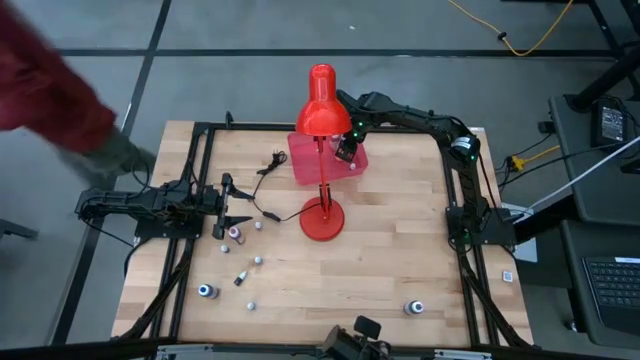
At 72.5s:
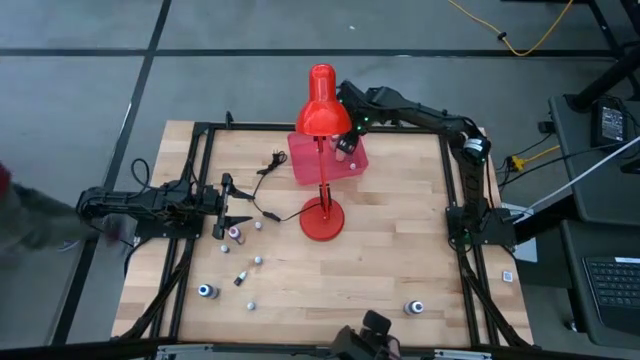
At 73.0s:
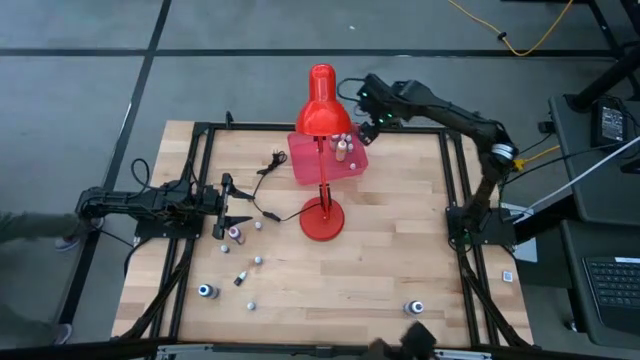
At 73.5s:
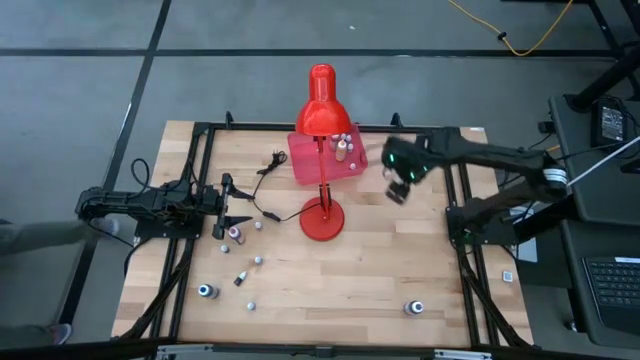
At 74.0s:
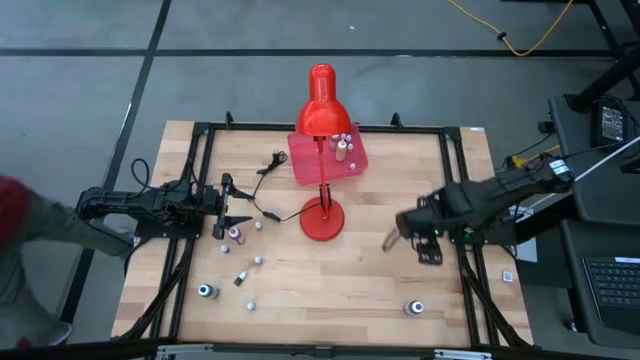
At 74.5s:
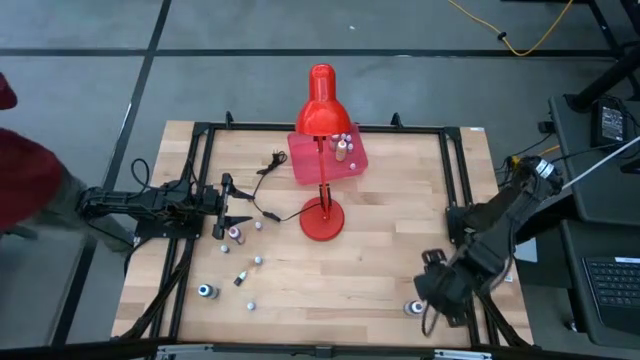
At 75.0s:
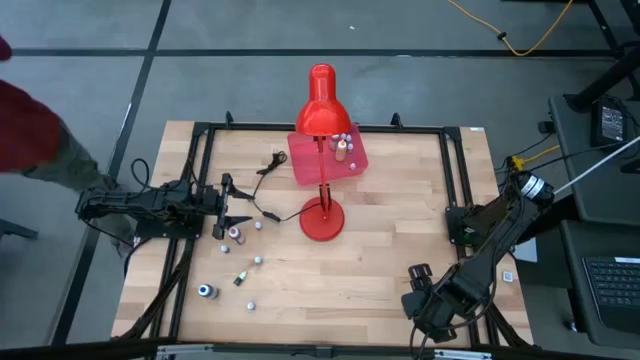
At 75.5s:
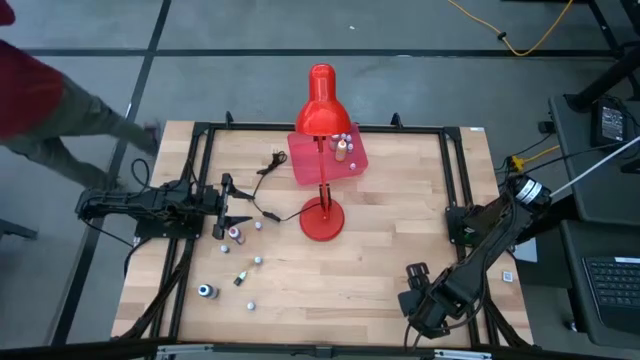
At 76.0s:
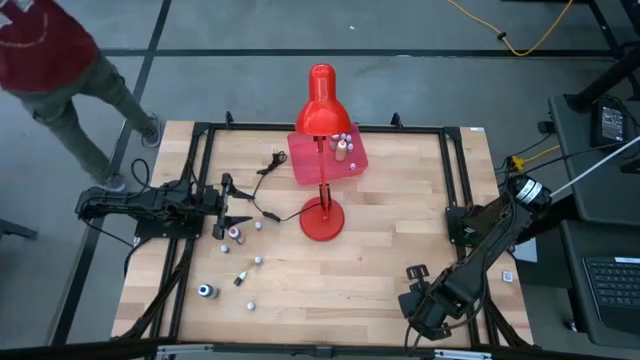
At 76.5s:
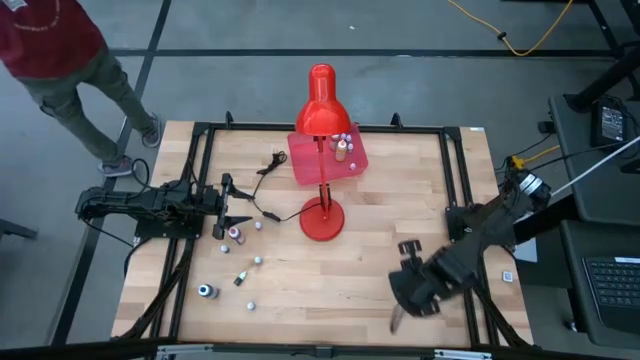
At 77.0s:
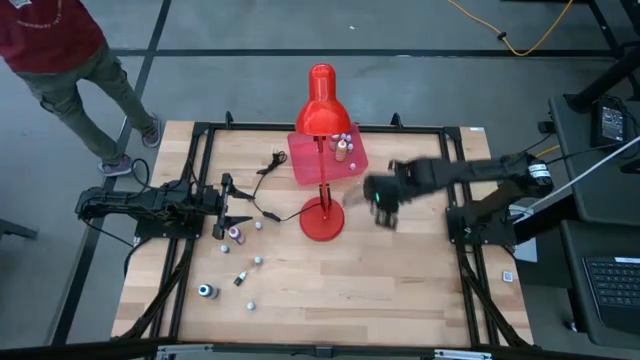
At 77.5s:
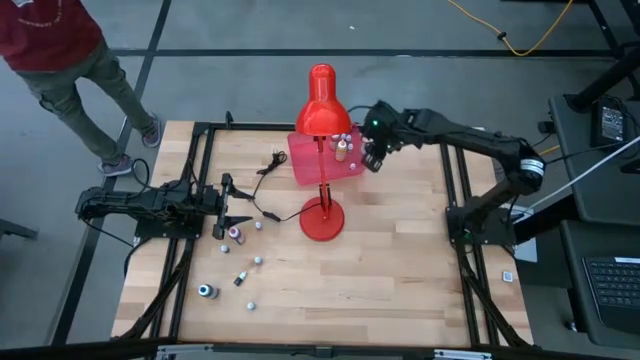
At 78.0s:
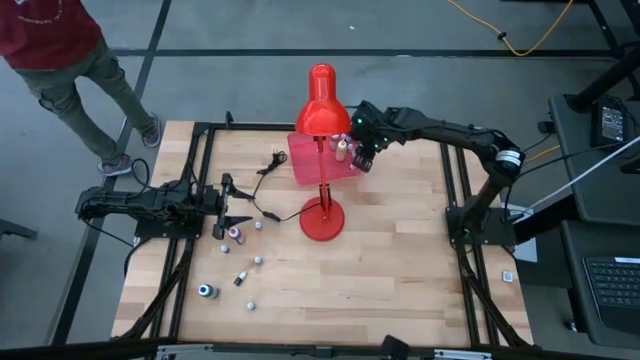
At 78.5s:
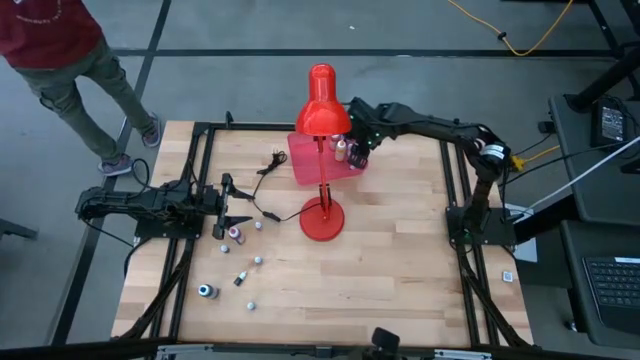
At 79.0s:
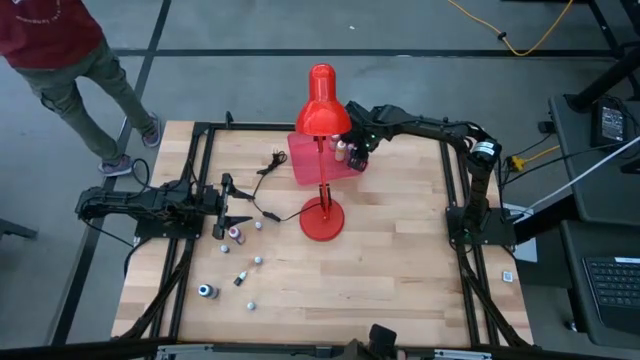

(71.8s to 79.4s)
Task: Pick & Place food coloring
Put the large purple food coloring bottle into the red bin

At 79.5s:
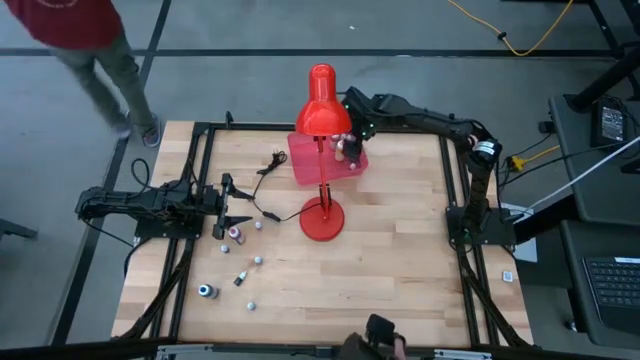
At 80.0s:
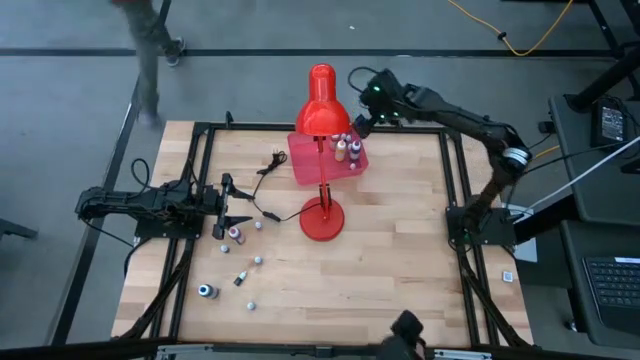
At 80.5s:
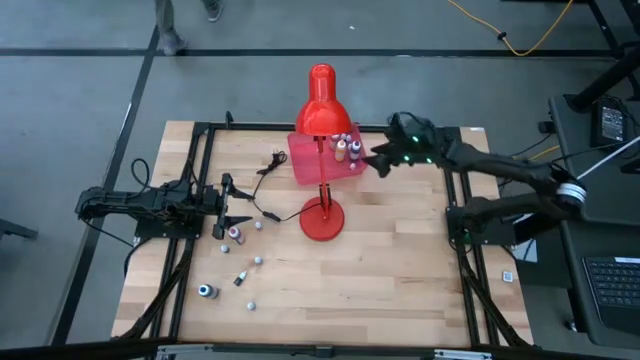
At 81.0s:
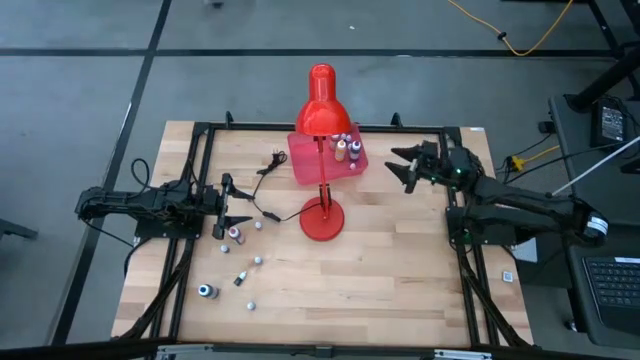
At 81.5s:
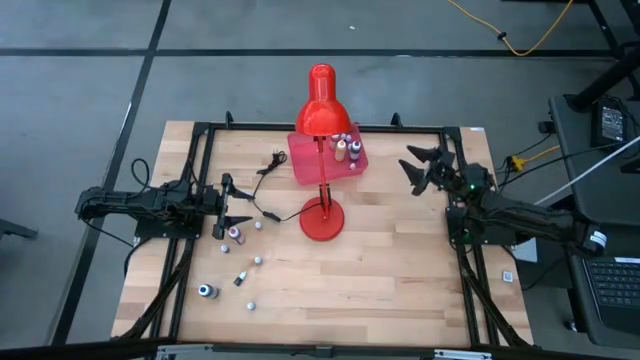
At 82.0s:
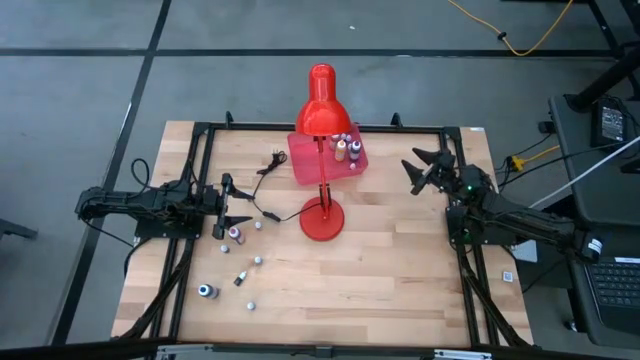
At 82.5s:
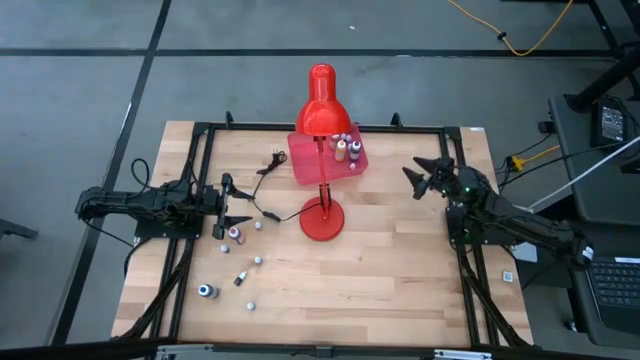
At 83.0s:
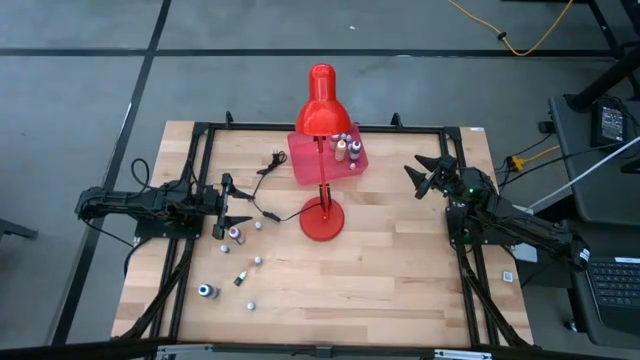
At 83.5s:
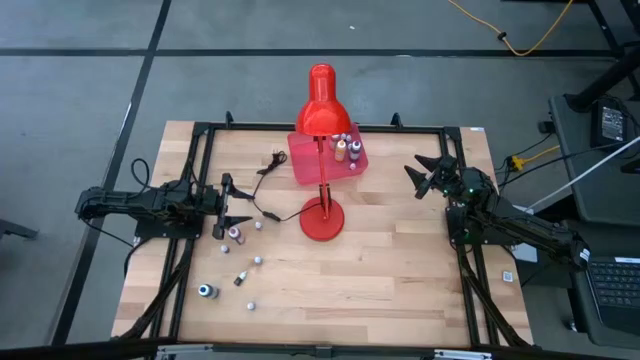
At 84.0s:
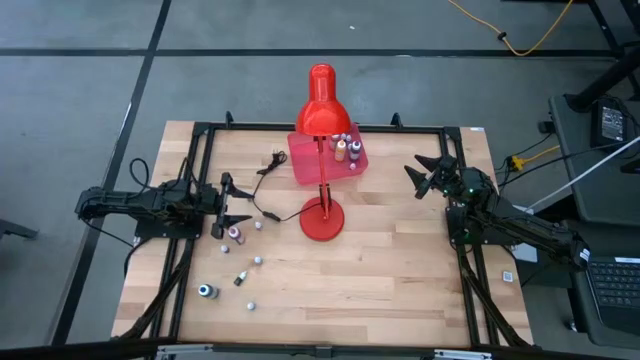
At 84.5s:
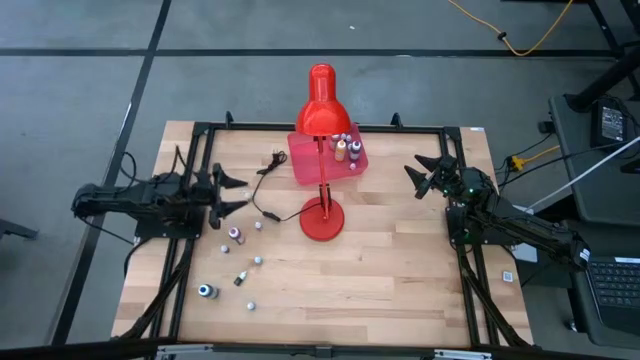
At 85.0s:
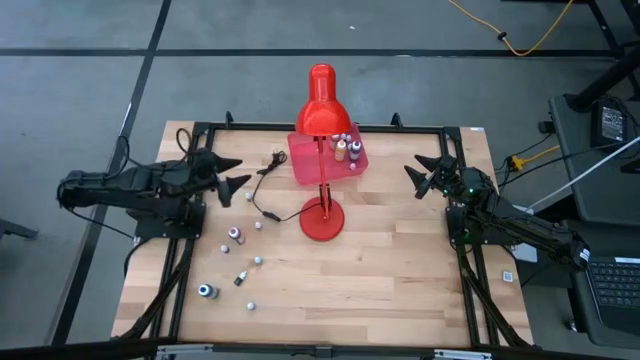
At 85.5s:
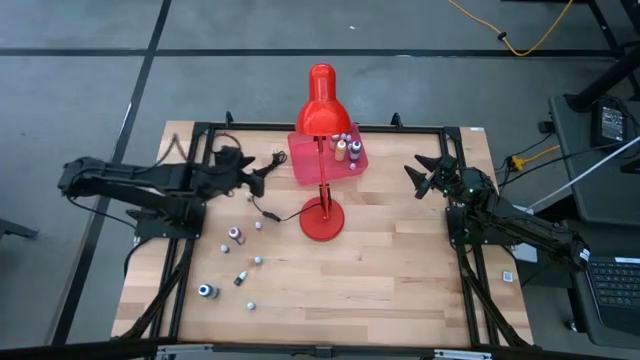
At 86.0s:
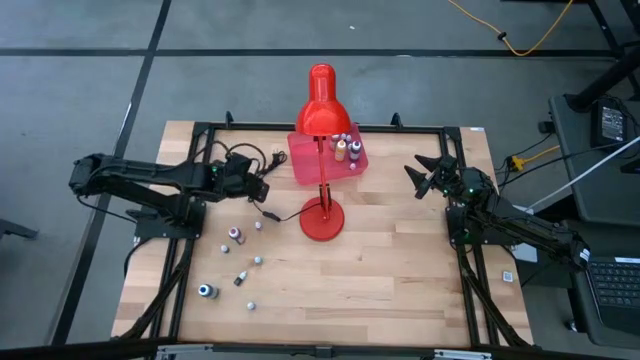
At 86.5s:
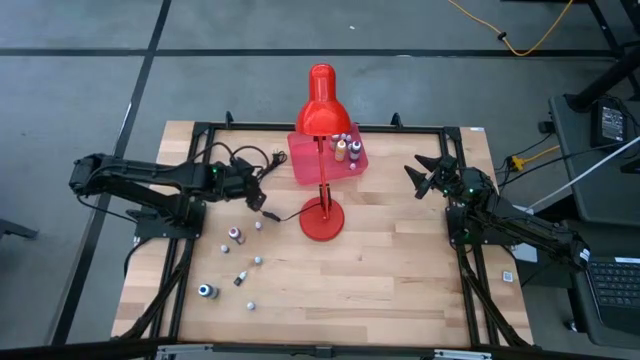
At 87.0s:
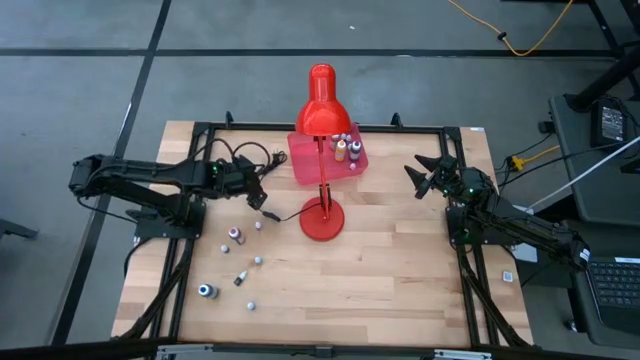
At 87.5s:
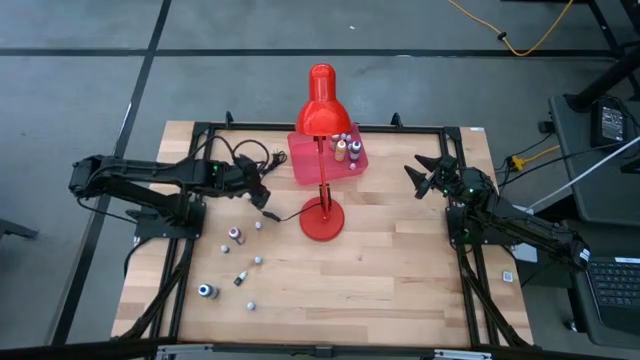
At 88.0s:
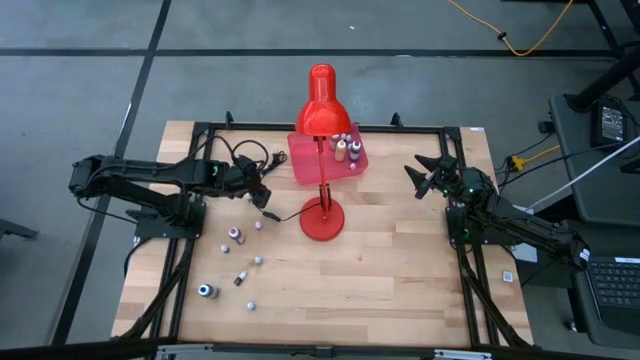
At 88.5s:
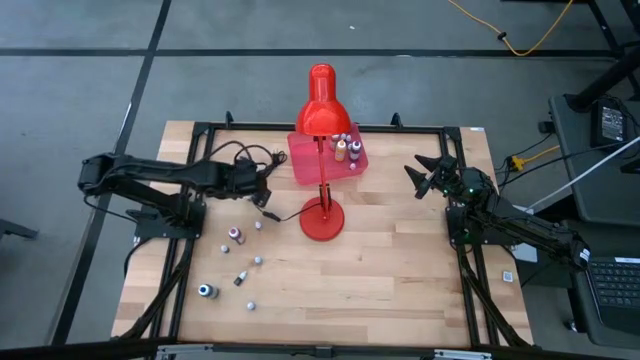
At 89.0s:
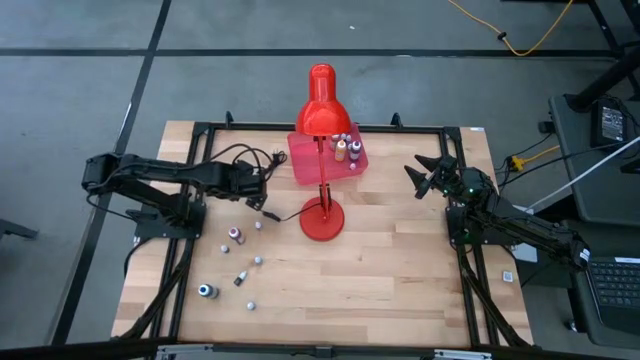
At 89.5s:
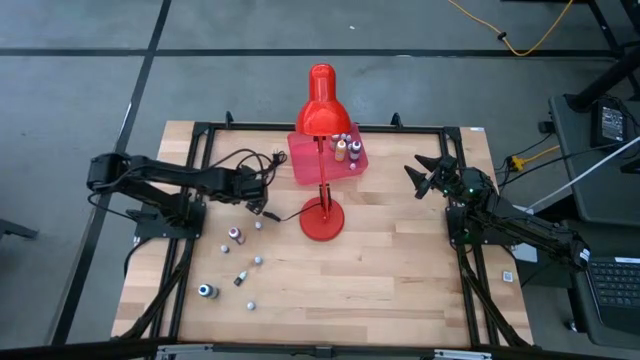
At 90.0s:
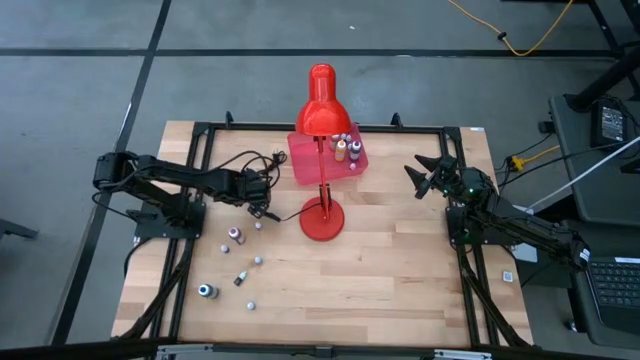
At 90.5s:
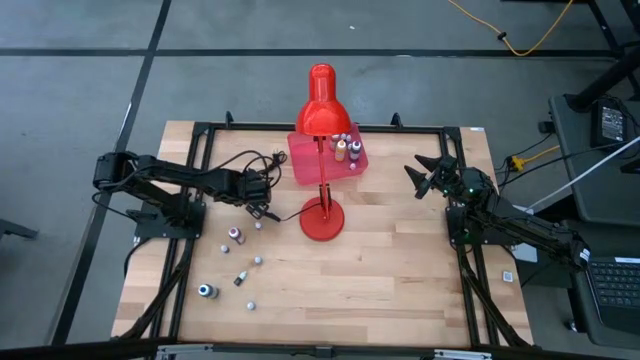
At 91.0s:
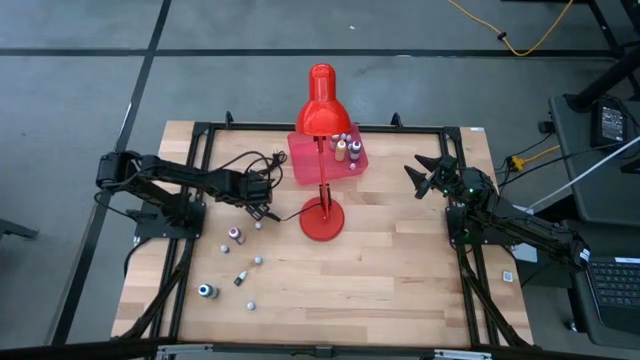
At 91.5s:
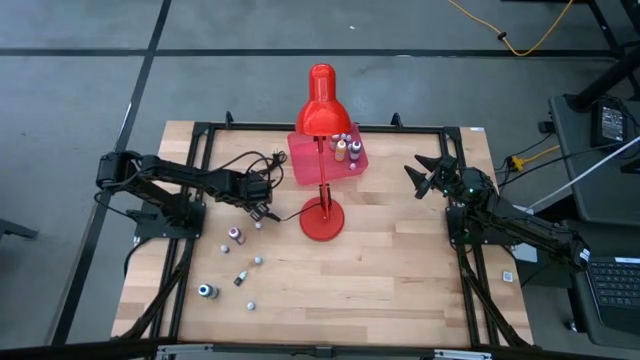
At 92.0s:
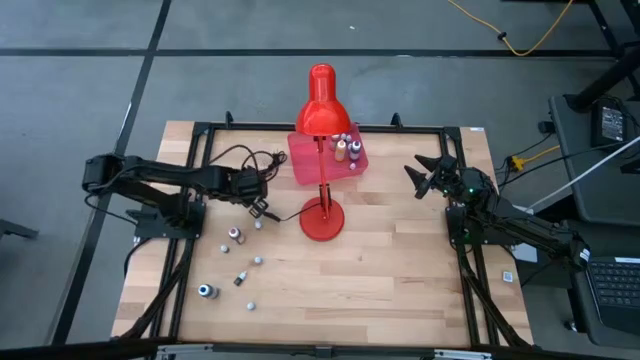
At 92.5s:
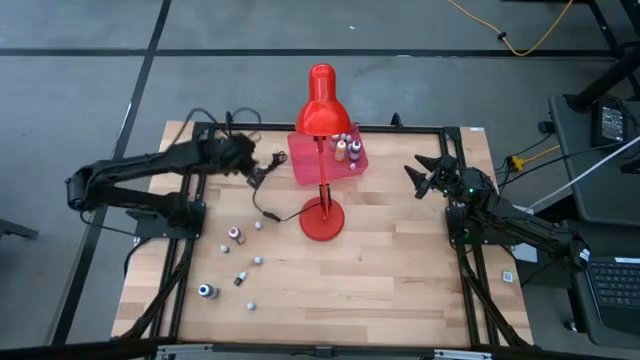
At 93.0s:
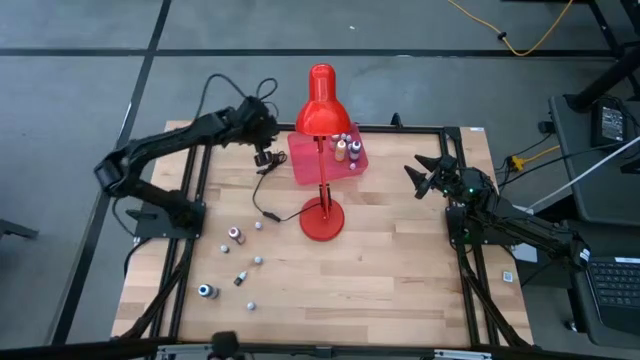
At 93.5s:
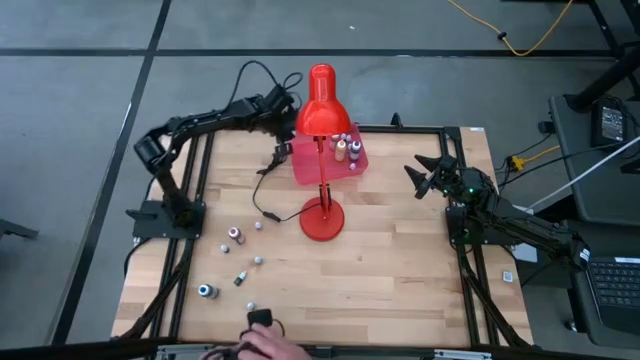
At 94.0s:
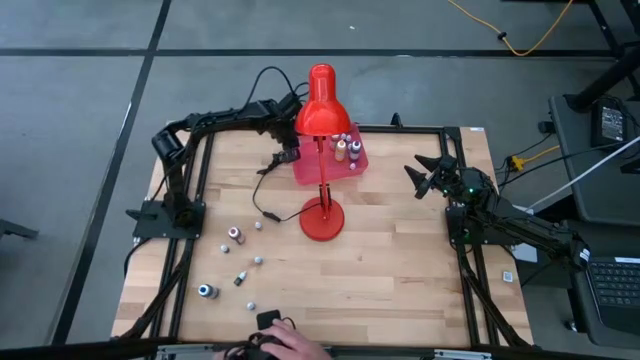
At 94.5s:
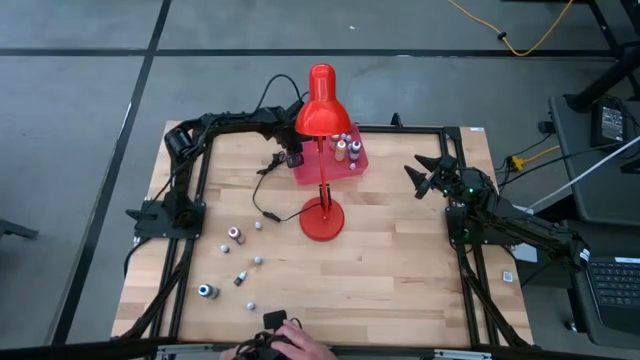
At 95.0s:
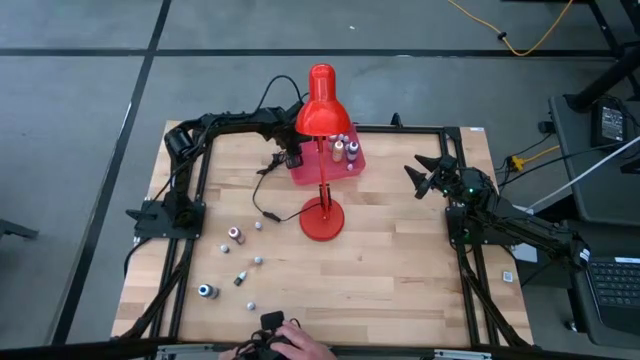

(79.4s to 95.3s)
Put the small red food coloring bottle into the red bin
